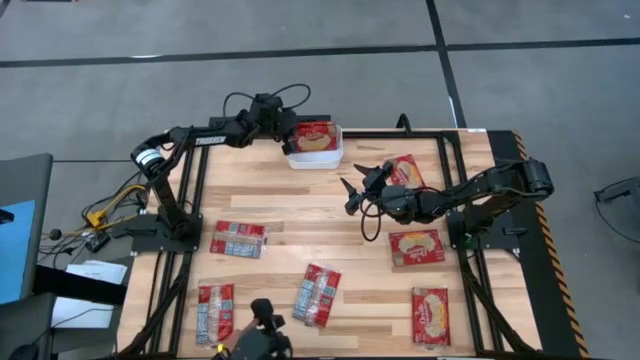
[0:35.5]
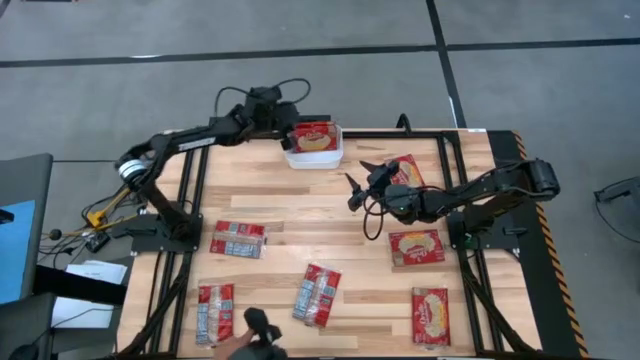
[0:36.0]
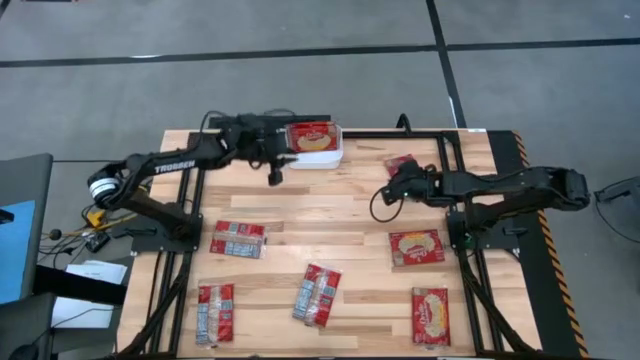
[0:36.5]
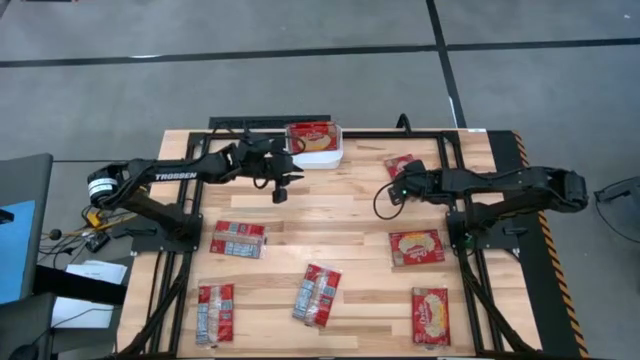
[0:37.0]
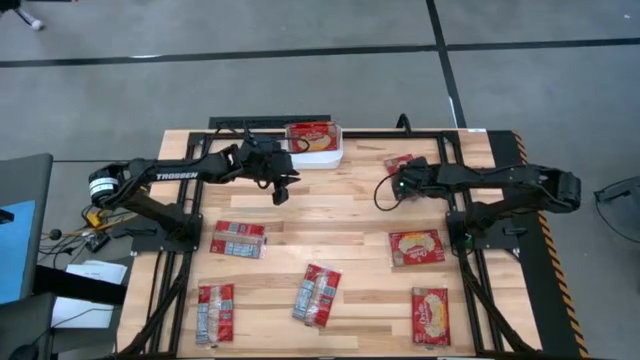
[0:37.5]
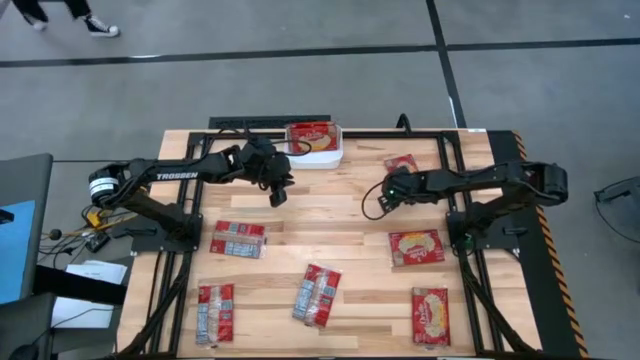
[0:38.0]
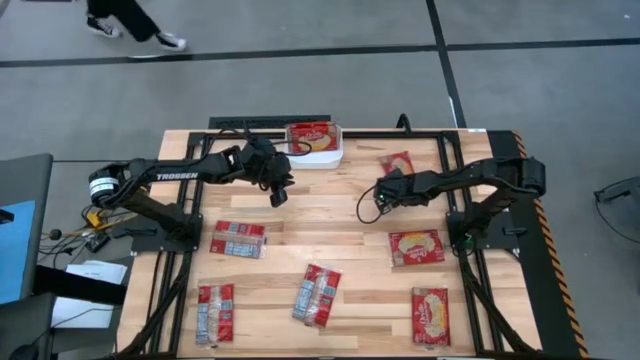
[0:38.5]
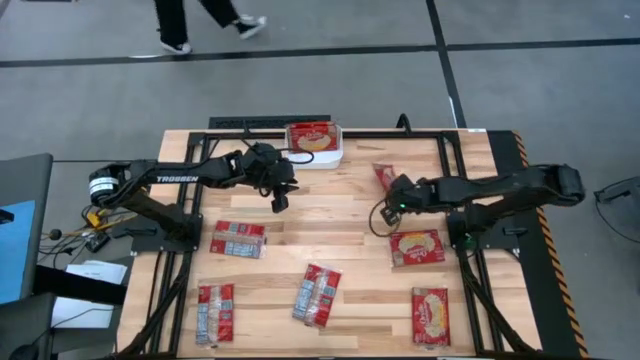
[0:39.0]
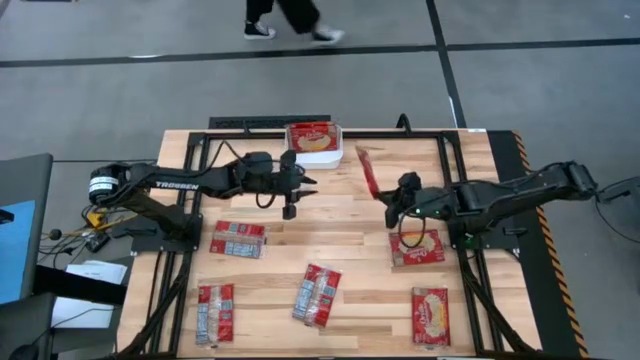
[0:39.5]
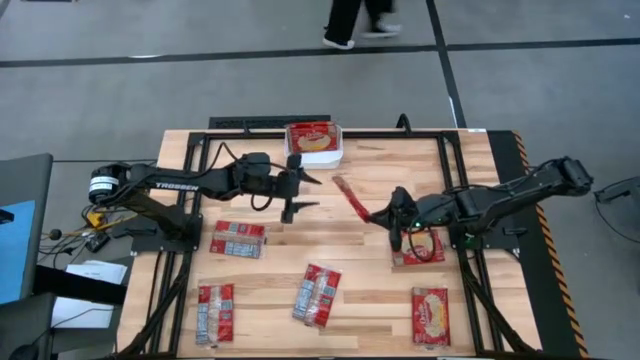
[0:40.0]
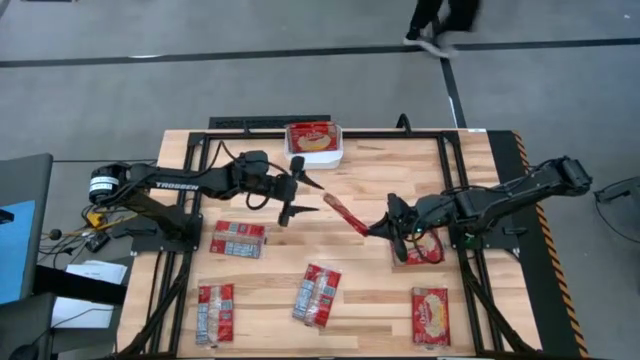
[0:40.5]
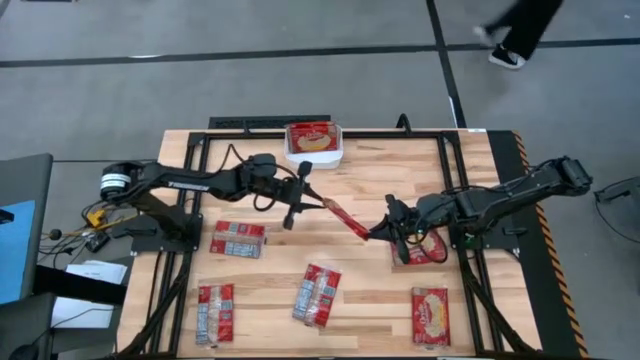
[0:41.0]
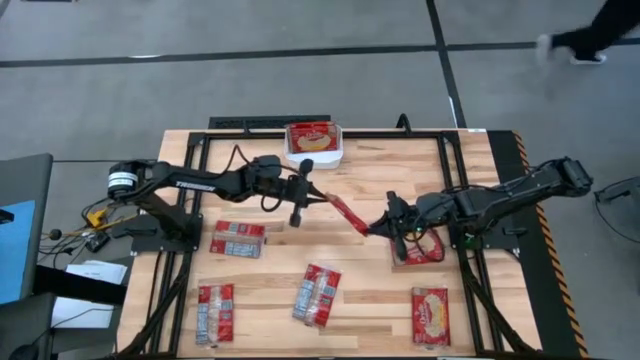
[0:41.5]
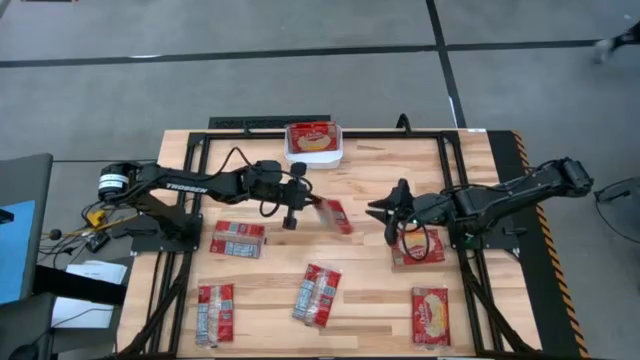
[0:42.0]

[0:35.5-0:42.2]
Task: Sort popcorn bags into baskets
Put the red popcorn bag into the white bin

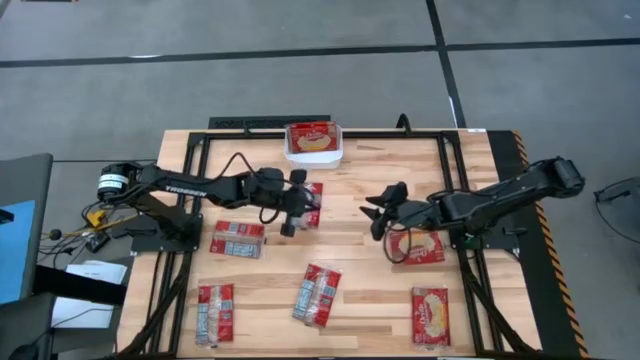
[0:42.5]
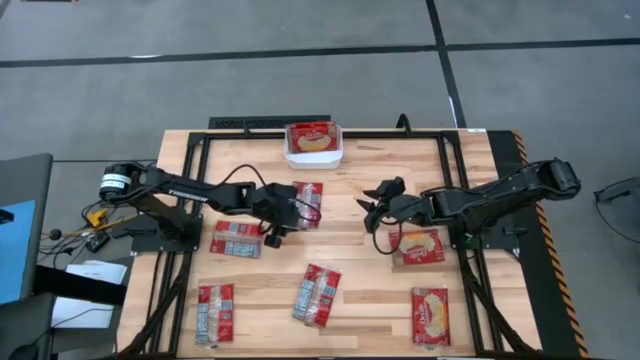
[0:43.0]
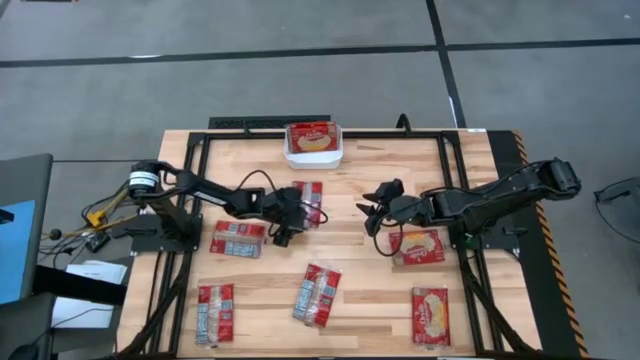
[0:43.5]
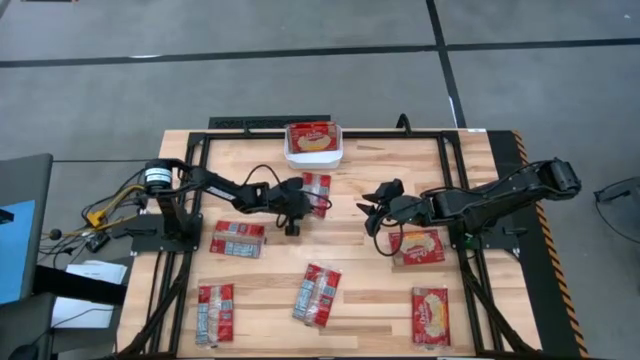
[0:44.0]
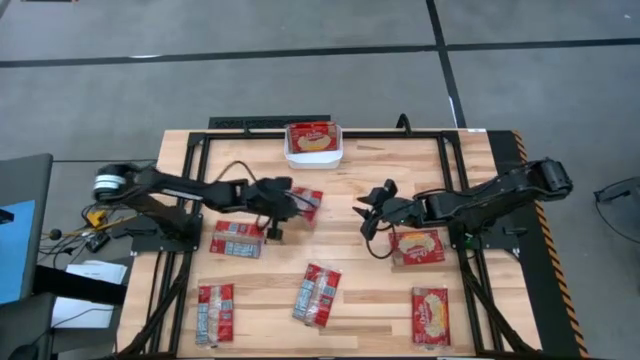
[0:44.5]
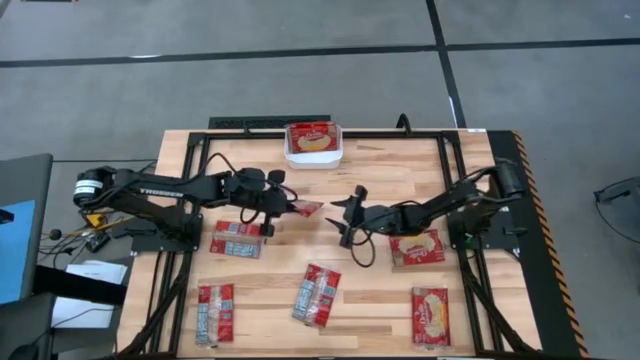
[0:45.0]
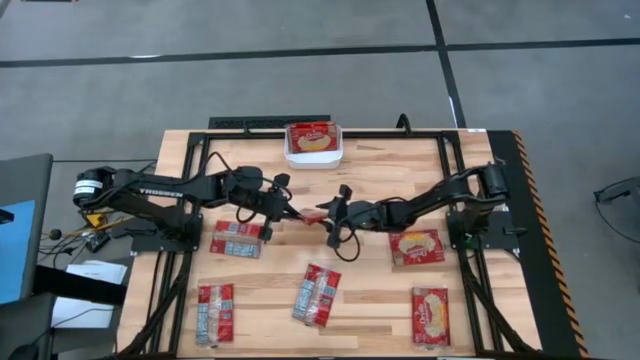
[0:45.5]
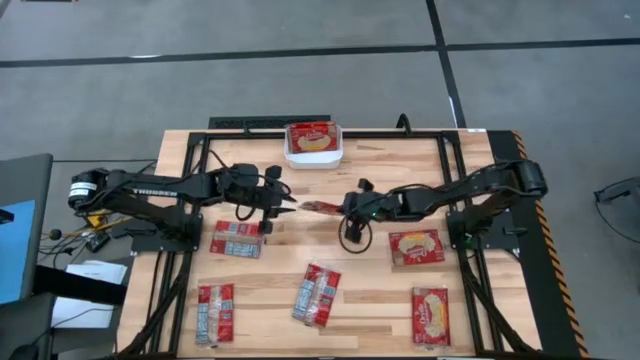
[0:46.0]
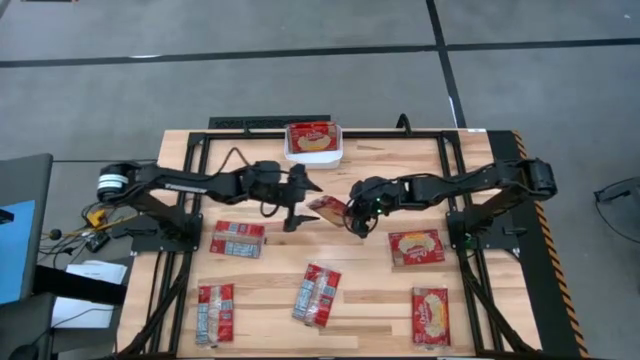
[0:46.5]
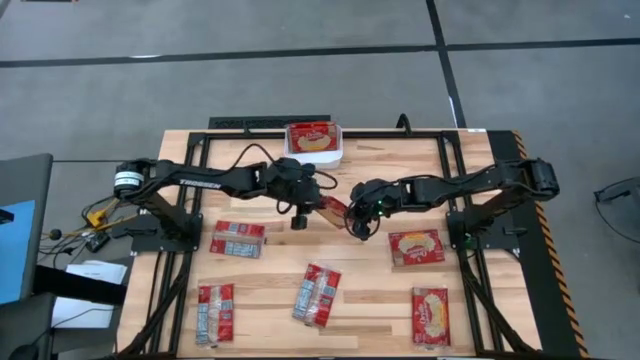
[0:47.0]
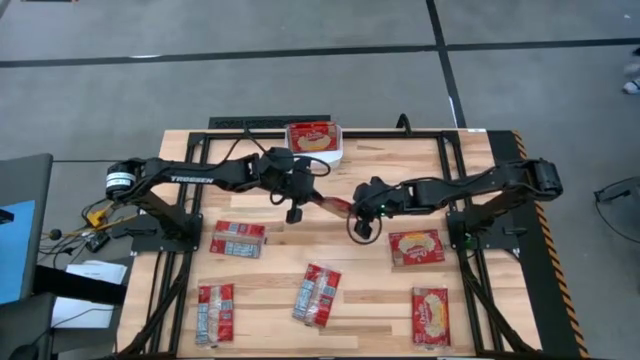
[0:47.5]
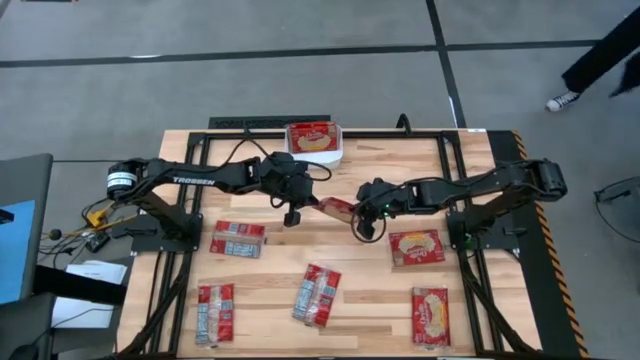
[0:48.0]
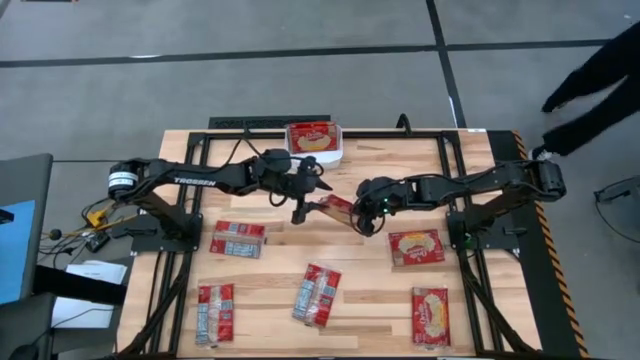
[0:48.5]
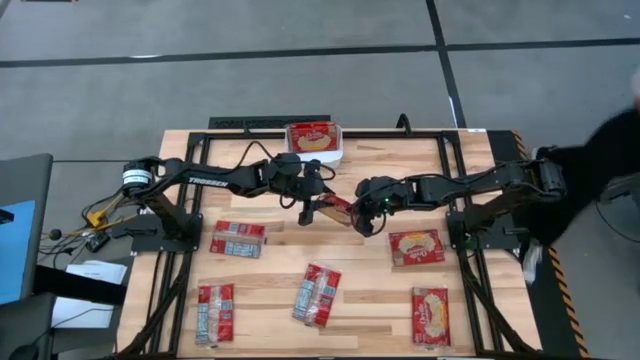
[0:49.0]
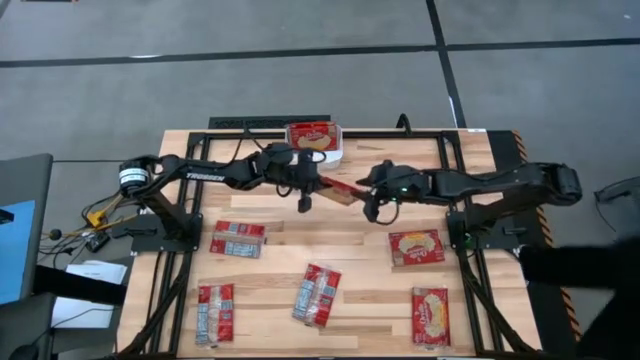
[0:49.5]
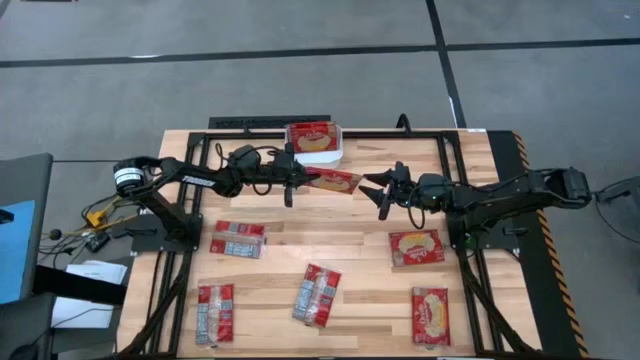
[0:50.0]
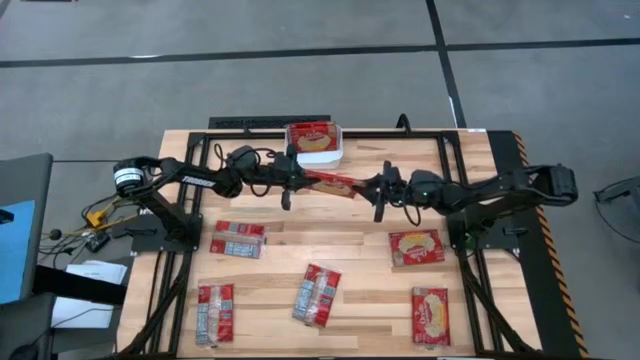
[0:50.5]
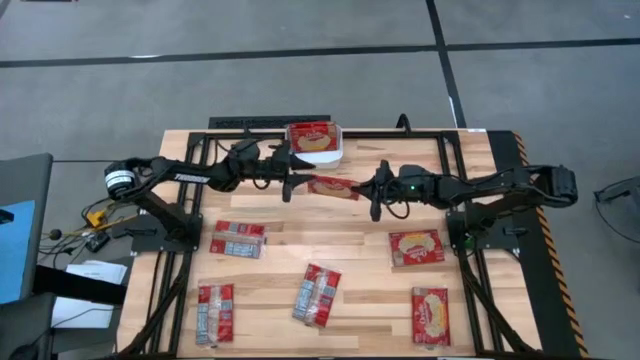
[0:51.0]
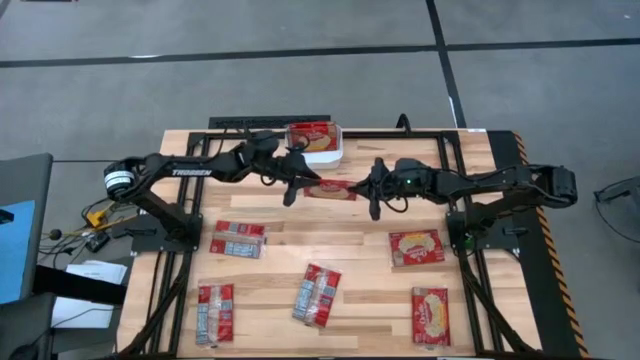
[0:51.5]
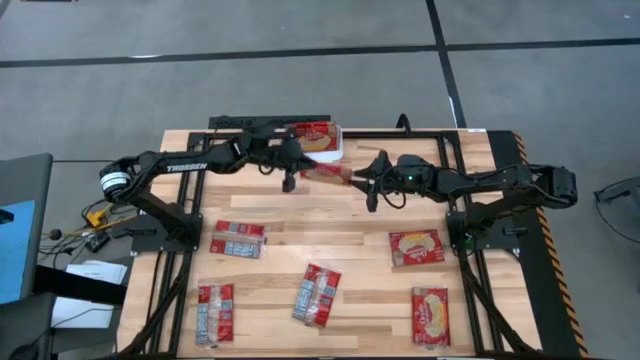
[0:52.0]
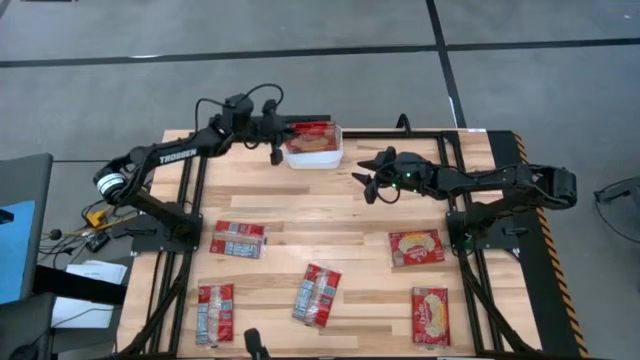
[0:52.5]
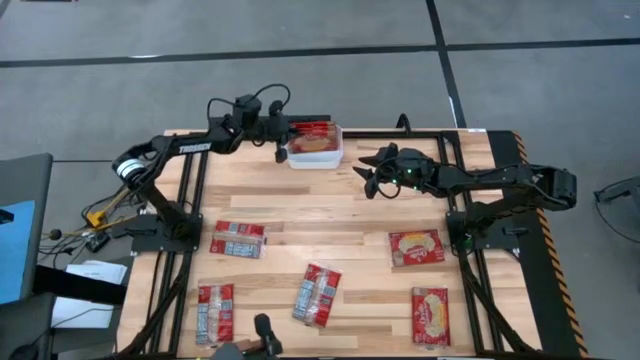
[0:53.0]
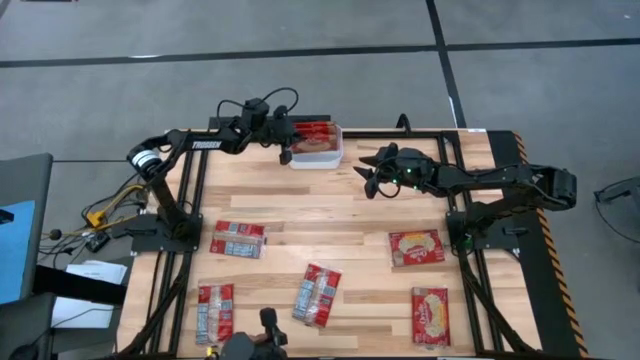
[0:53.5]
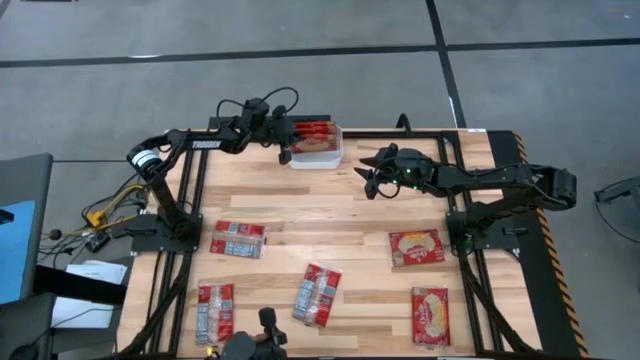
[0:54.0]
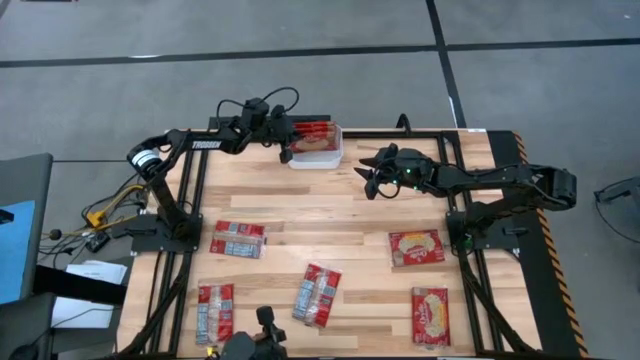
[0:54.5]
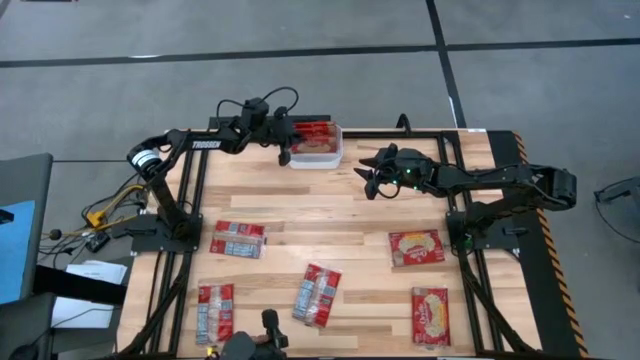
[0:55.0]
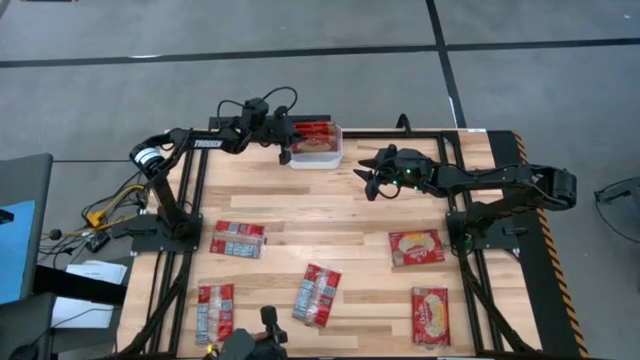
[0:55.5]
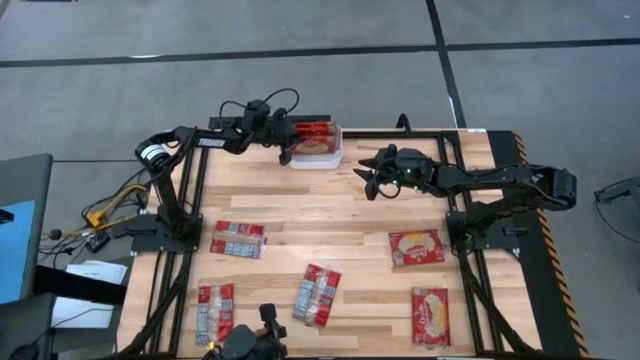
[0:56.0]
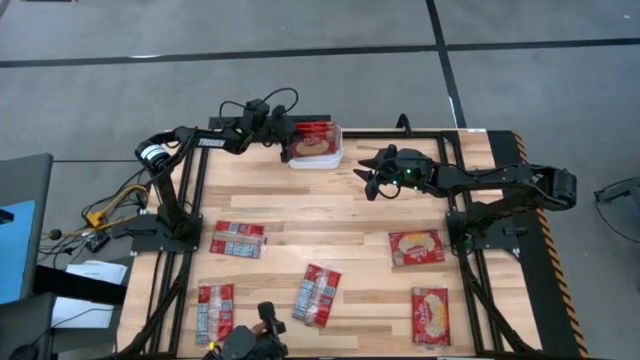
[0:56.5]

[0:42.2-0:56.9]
Put the red popcorn bag into the white bin
